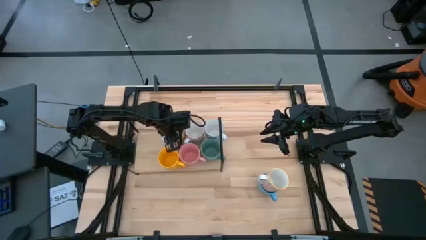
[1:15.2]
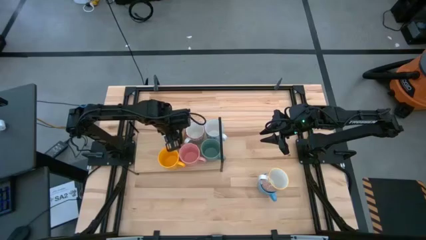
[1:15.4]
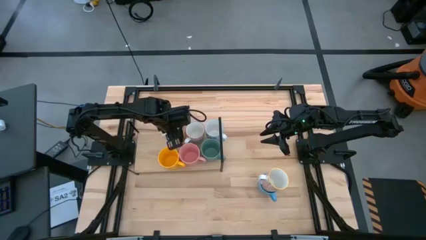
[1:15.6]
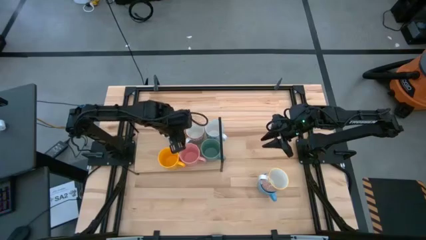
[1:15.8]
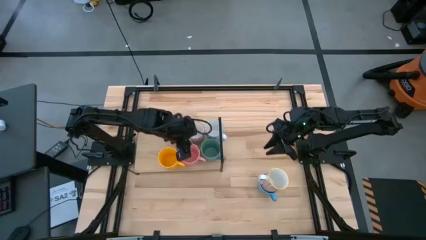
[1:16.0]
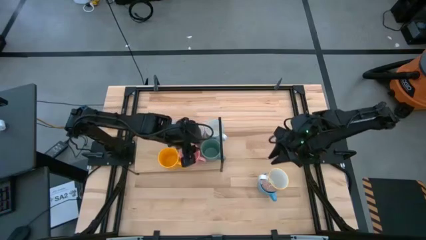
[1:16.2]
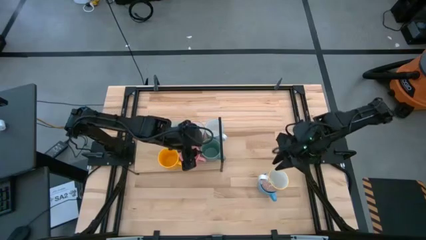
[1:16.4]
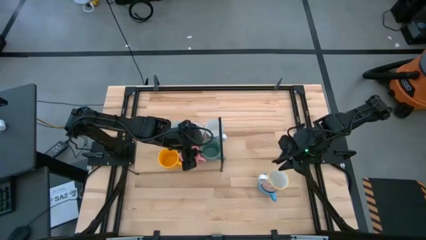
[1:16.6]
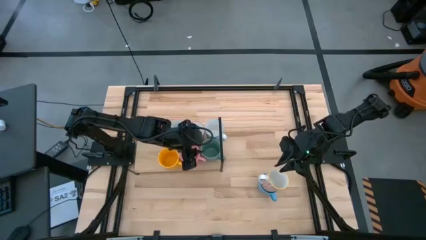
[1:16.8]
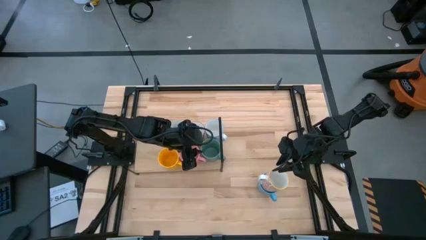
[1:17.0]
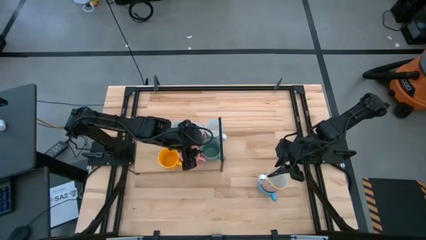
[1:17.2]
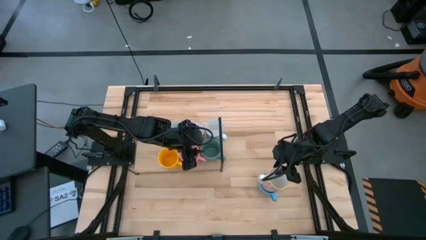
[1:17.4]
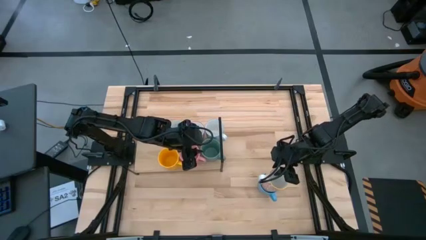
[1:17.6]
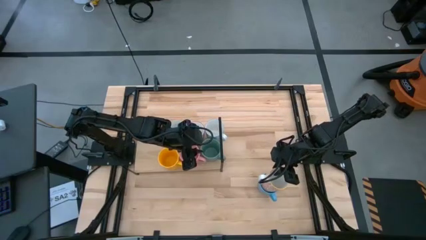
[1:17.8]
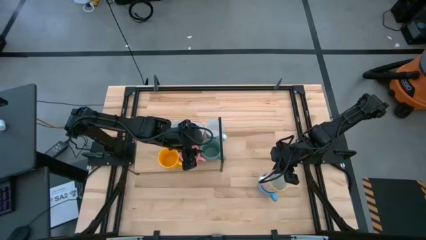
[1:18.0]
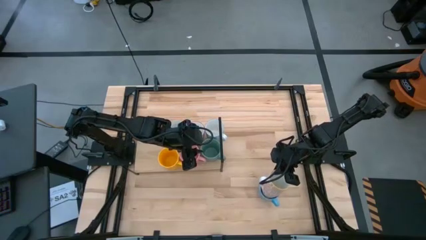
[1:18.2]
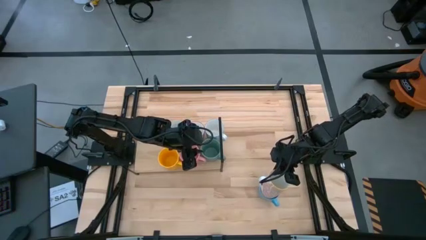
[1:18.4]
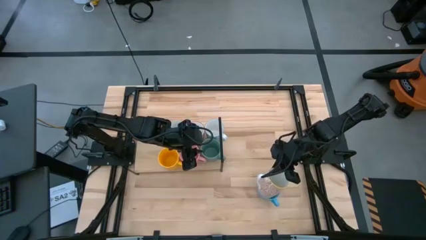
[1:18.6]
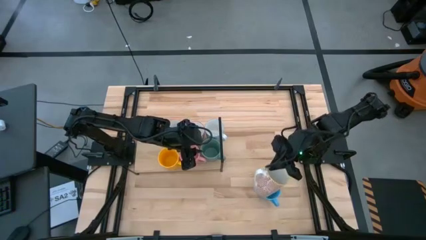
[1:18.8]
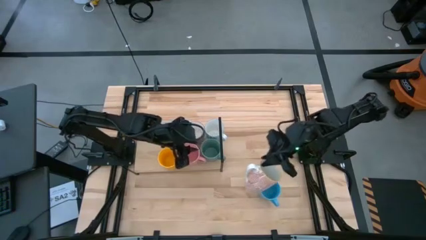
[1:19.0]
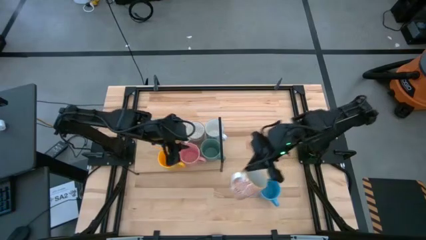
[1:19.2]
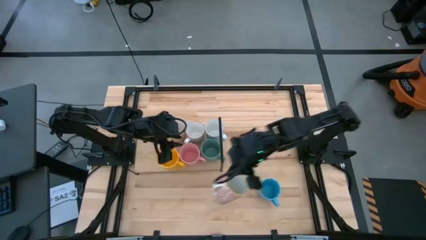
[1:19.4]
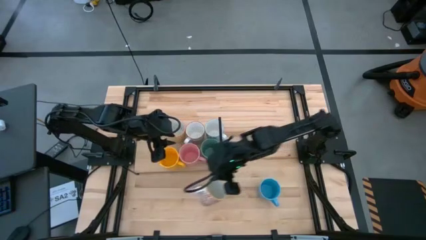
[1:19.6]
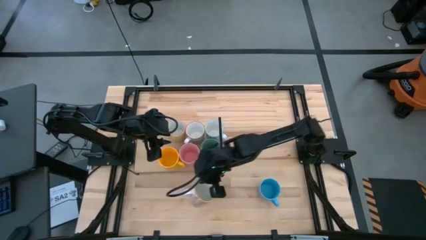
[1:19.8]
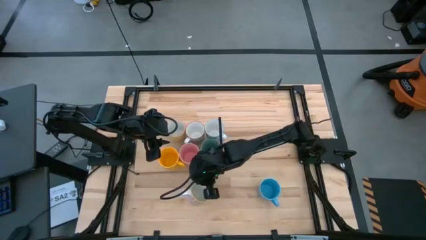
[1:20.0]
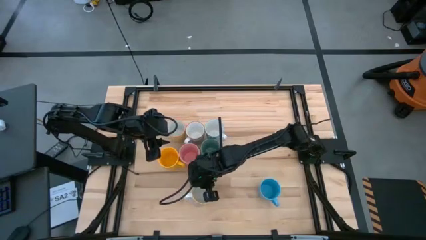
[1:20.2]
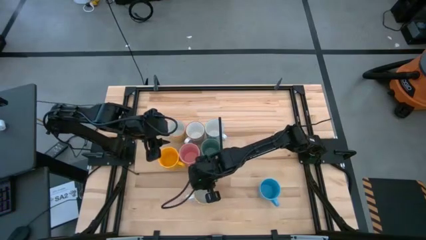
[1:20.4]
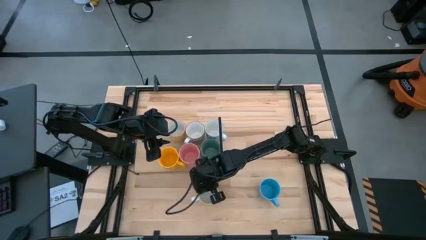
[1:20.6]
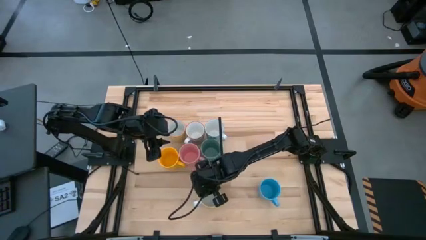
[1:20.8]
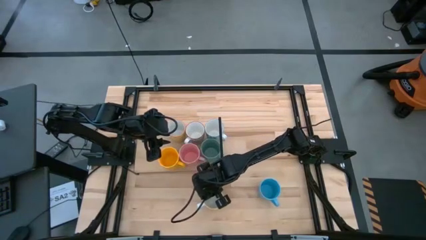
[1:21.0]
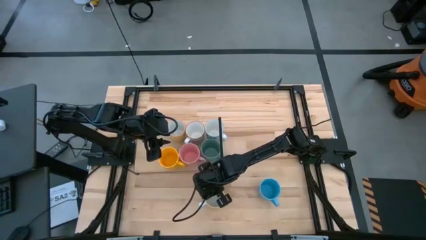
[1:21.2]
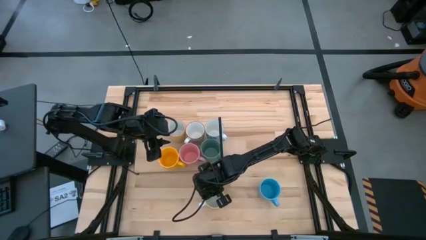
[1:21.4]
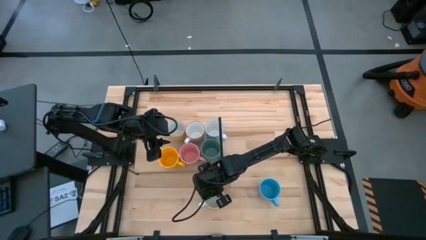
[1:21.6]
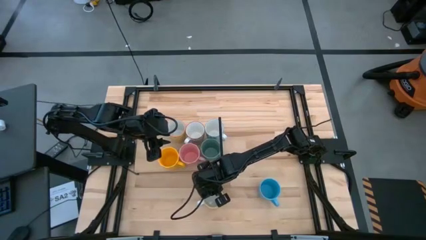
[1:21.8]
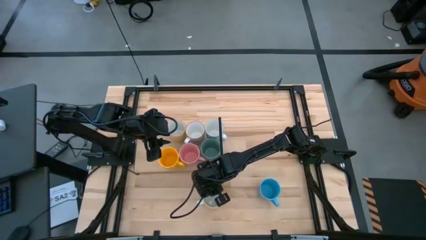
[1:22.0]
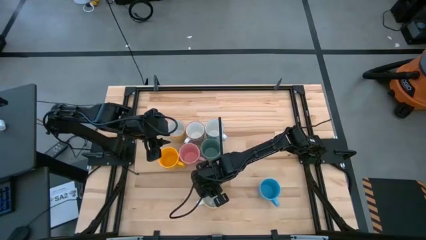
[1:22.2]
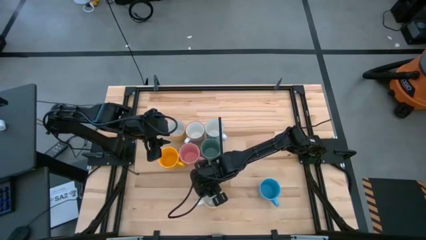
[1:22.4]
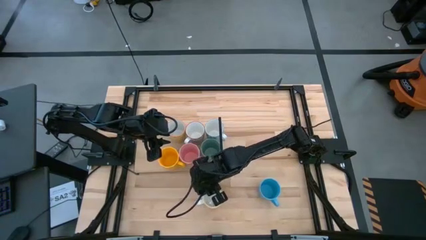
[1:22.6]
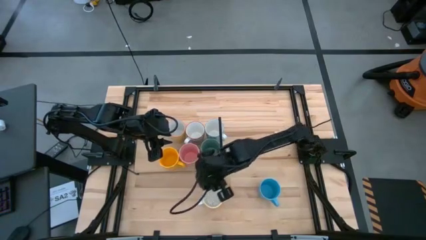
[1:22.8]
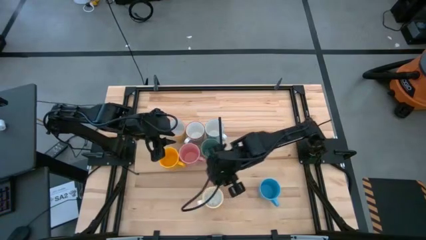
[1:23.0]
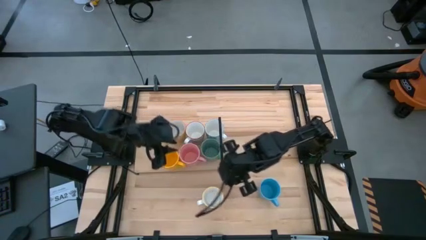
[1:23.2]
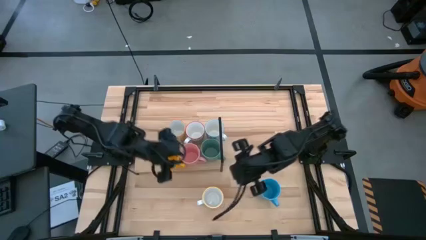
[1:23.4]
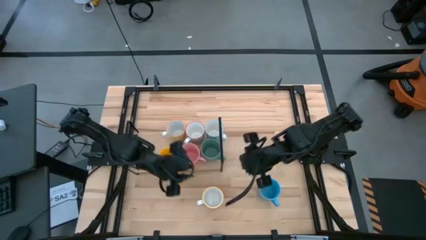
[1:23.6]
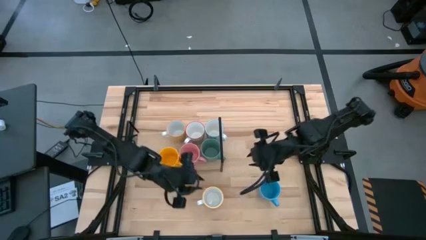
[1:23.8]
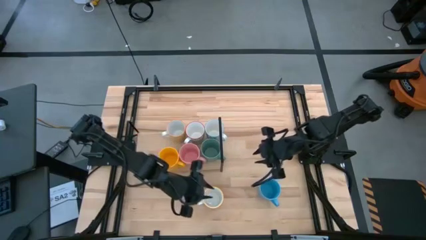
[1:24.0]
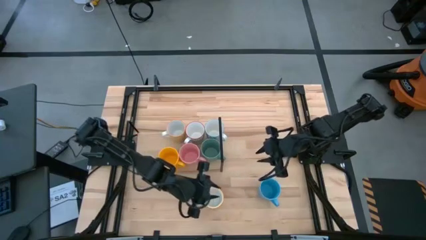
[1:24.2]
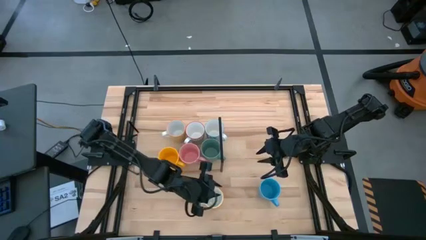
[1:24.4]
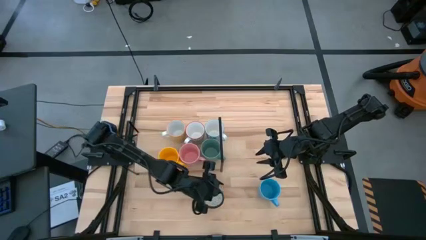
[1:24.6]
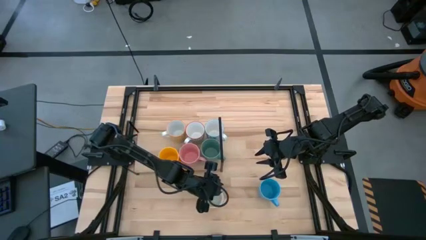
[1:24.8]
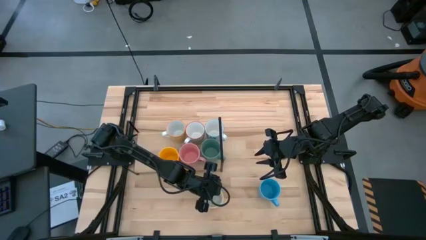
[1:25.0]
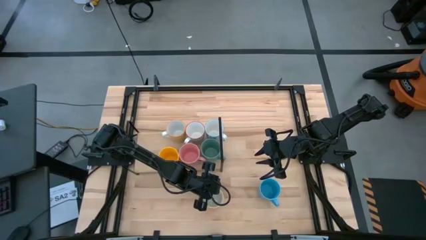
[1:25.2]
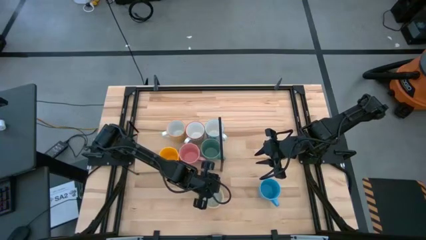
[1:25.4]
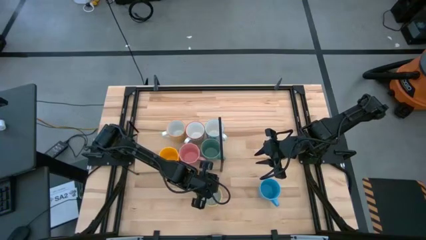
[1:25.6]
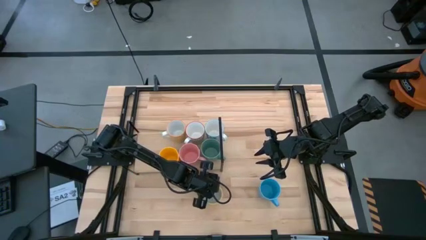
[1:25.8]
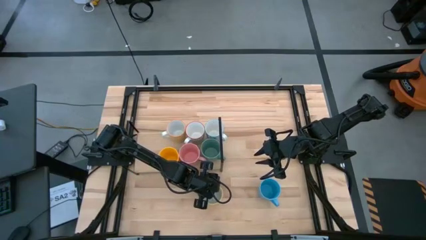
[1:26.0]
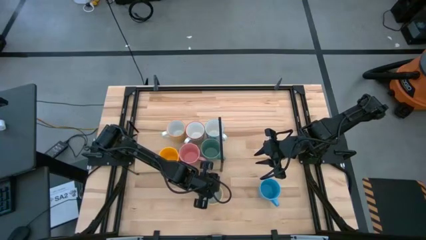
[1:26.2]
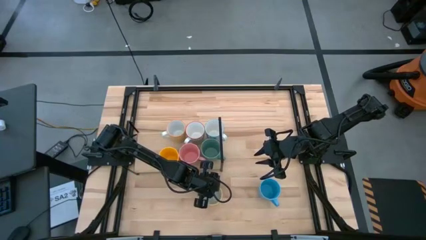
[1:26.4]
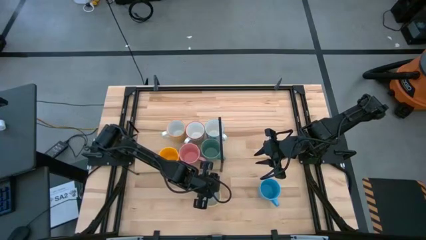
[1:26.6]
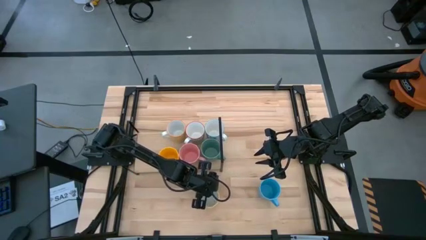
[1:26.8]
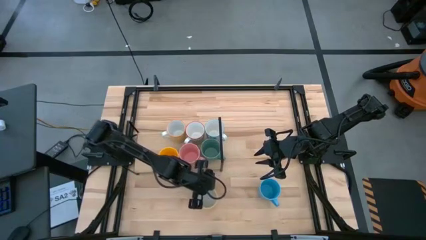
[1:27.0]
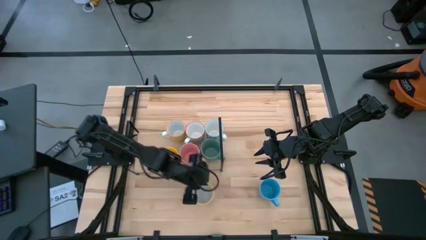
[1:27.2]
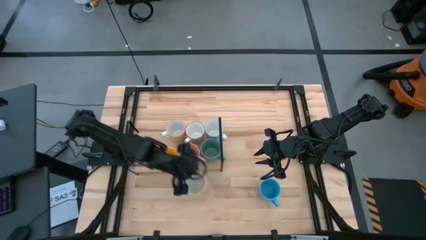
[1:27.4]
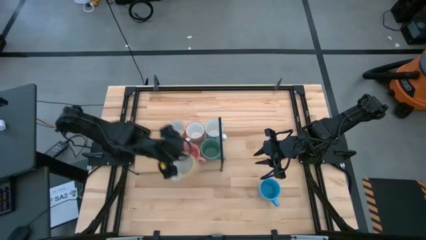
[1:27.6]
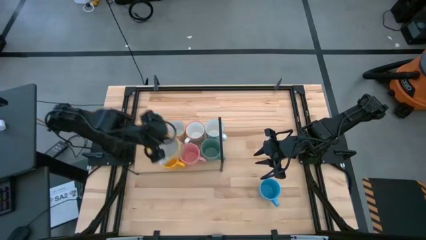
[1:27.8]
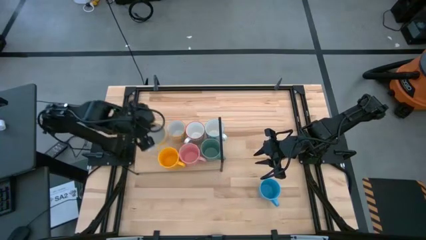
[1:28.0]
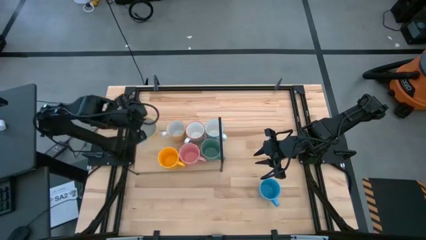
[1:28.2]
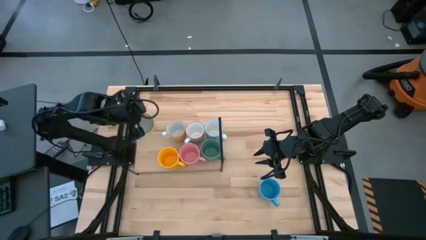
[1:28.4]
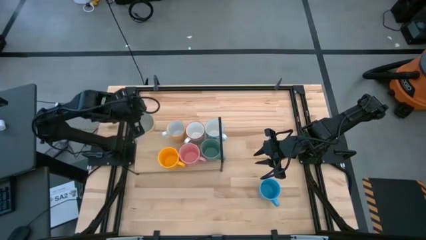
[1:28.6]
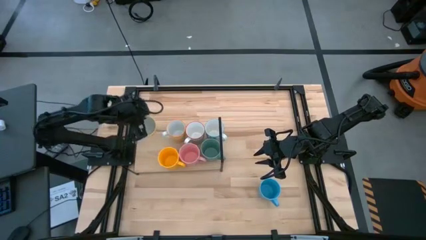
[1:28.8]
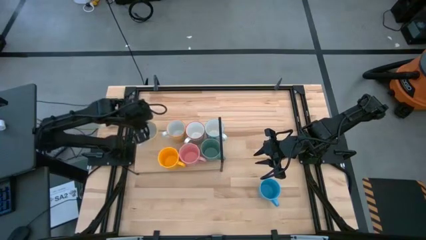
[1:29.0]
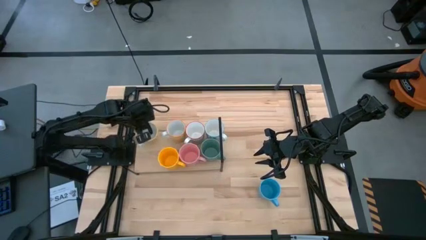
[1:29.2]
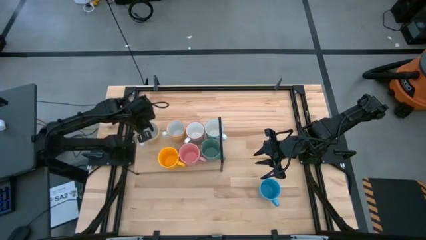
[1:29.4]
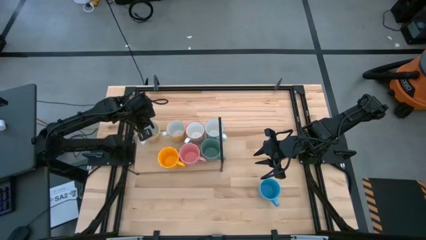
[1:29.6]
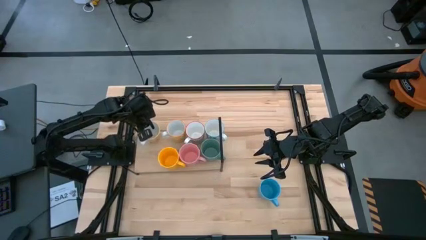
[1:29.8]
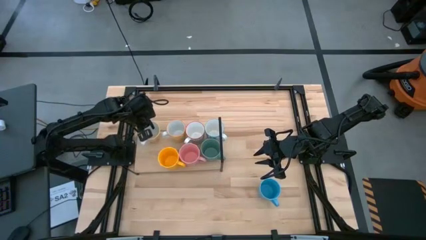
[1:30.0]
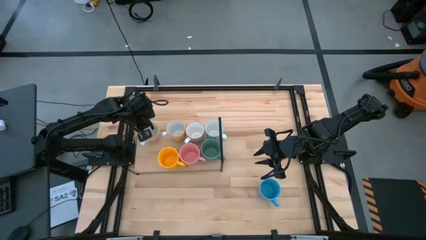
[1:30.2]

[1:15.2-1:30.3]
Task: Place coffee mugs
Put the orange patterned mug on the shelf
